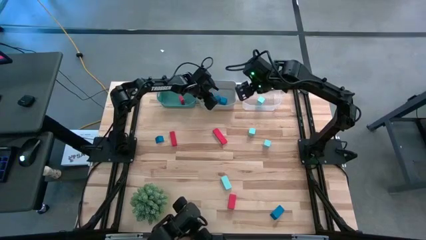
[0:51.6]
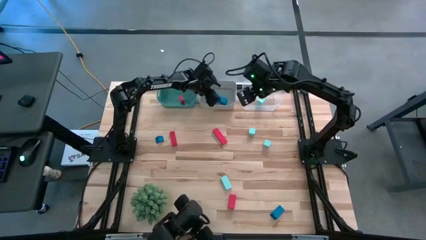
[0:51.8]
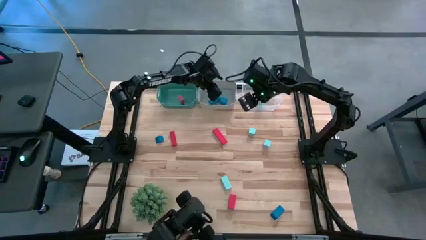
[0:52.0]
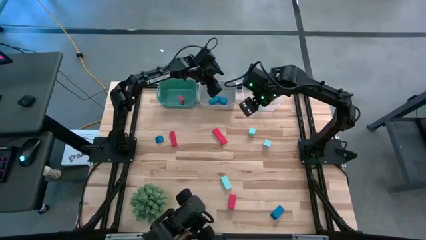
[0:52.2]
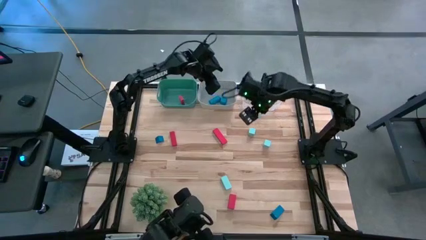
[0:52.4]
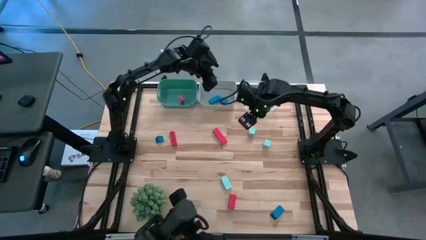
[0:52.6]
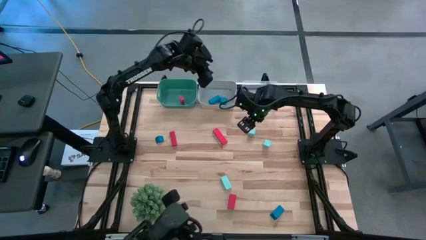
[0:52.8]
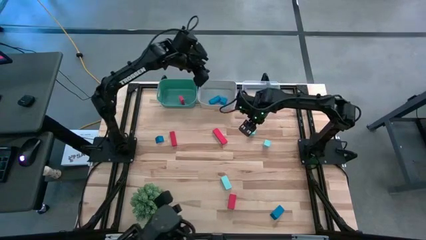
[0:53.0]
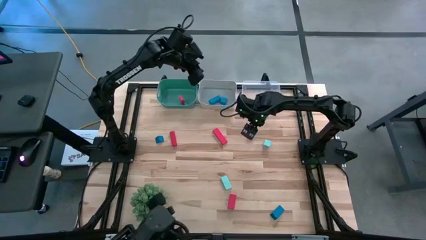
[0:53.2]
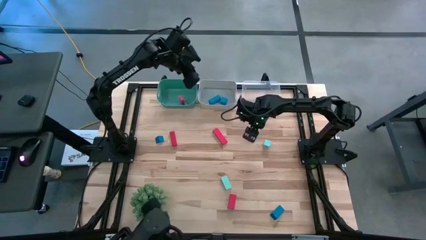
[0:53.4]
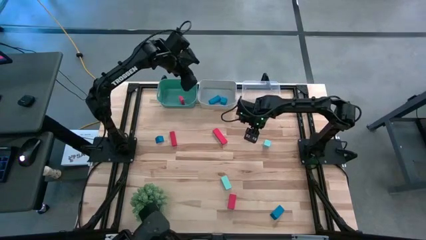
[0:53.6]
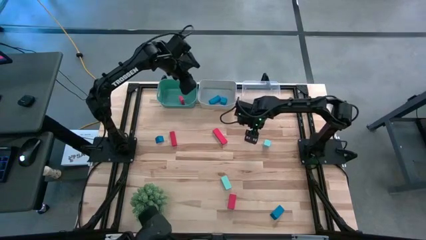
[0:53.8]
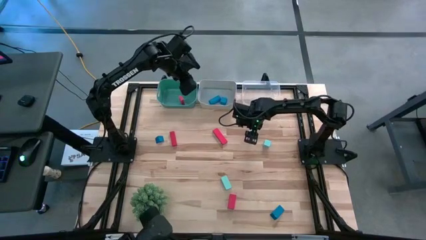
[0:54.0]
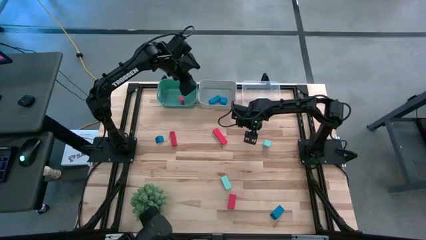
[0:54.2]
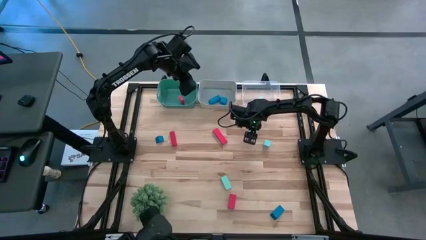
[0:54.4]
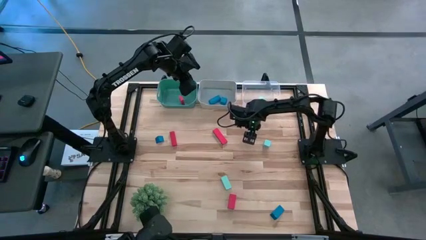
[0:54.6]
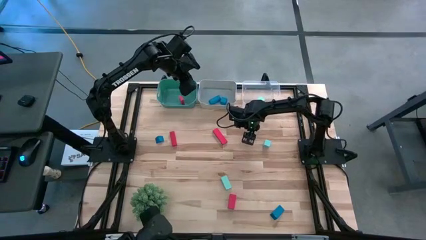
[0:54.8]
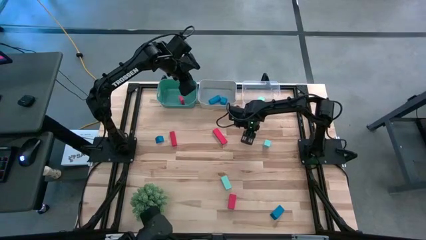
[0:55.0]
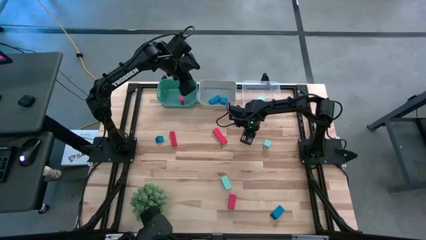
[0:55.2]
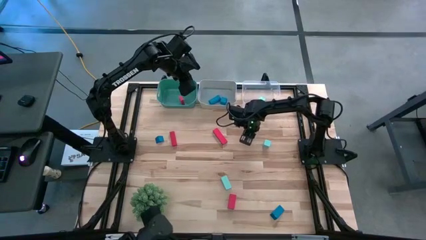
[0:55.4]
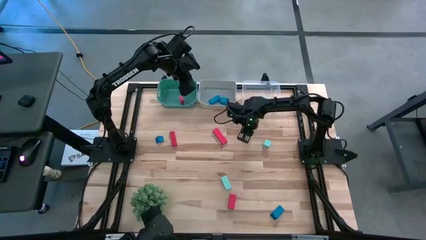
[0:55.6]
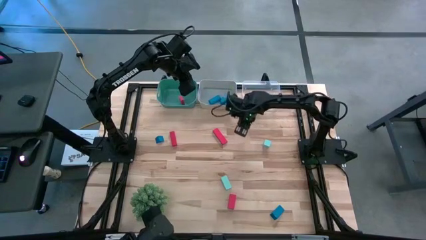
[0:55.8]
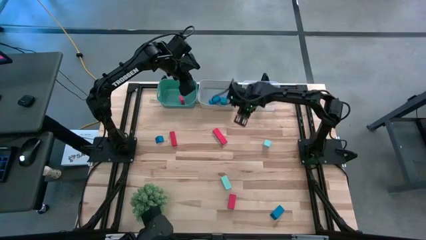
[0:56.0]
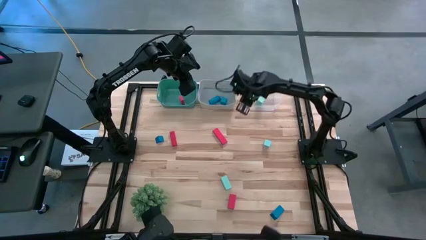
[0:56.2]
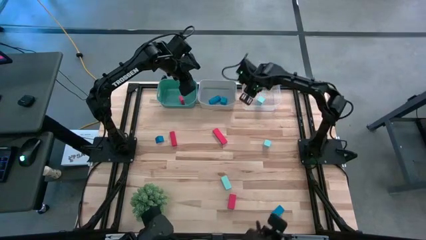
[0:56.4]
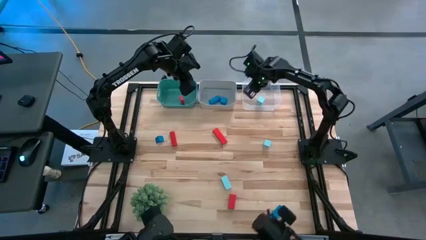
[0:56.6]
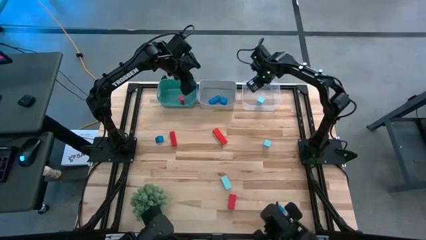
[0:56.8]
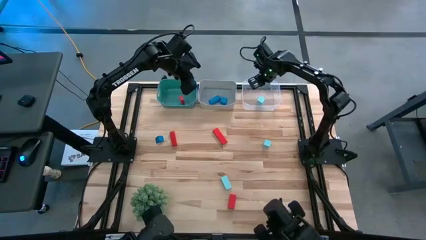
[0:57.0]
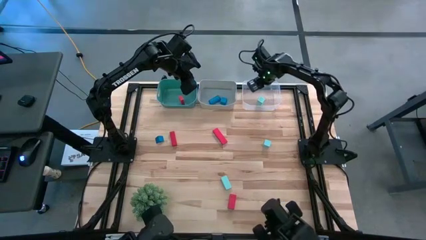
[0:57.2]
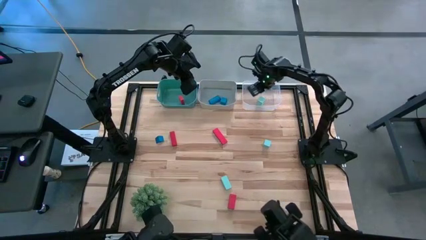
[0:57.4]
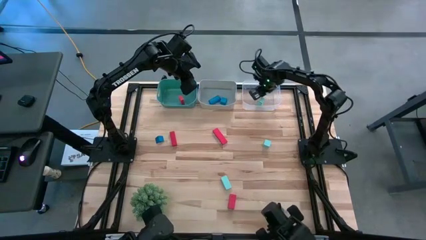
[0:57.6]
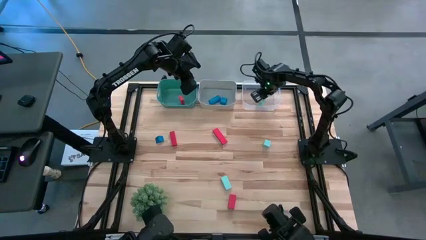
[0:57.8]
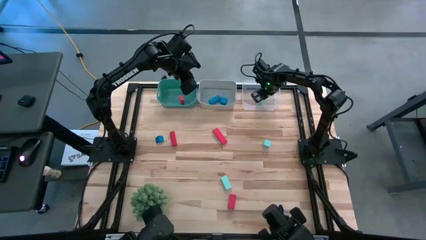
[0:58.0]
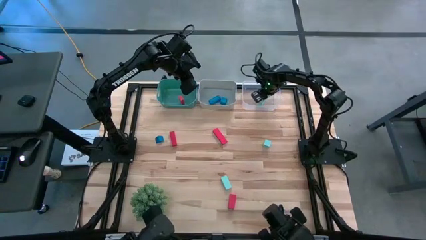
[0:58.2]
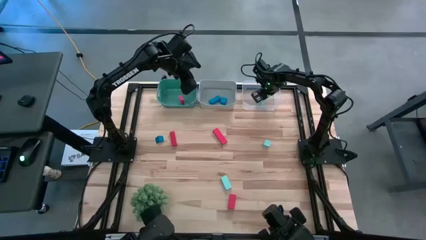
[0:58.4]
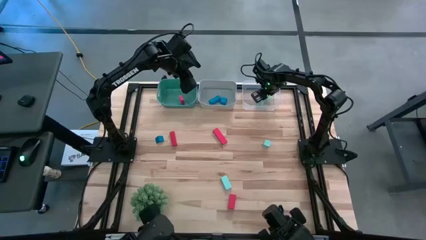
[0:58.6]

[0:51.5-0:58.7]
Task: Sort & place blocks by color
Put the light blue block into the transparent bin

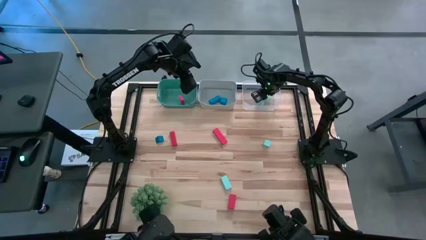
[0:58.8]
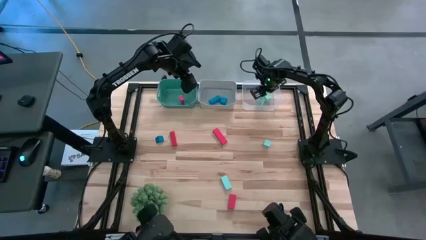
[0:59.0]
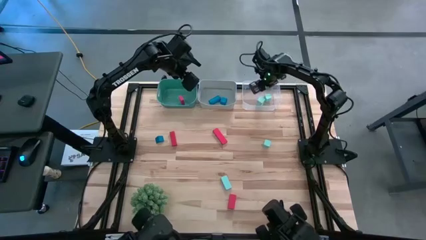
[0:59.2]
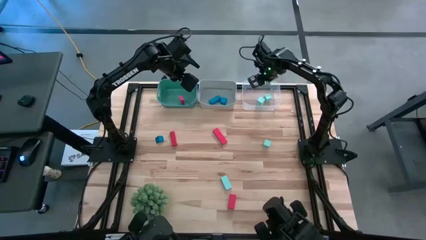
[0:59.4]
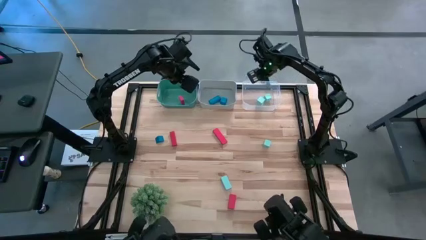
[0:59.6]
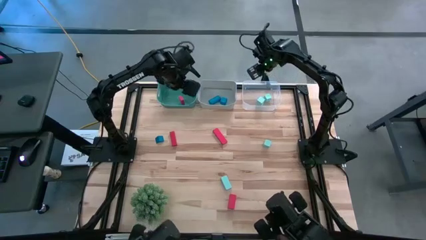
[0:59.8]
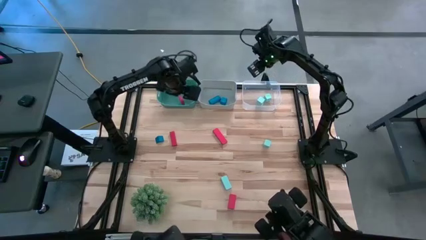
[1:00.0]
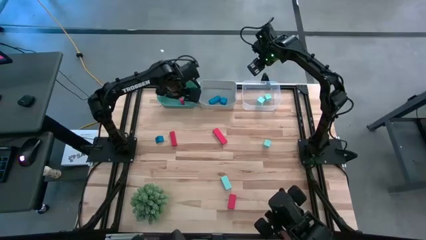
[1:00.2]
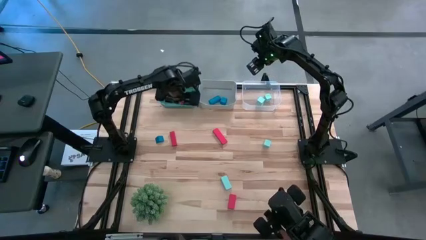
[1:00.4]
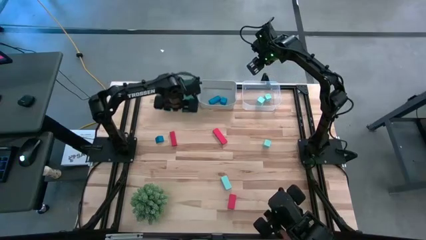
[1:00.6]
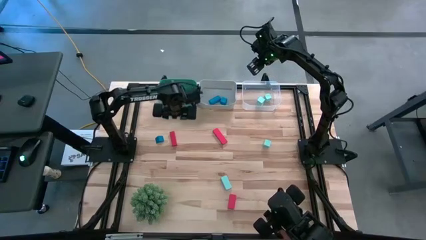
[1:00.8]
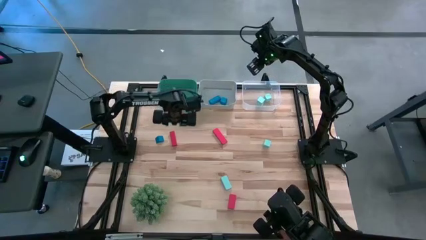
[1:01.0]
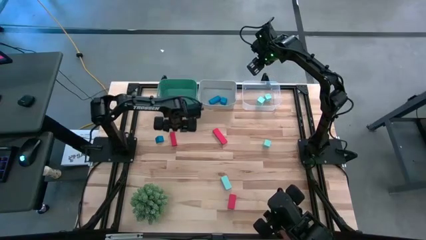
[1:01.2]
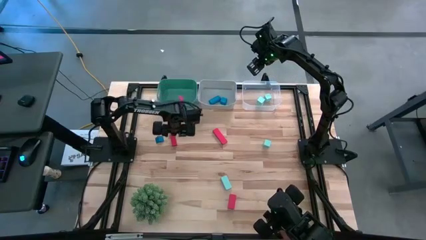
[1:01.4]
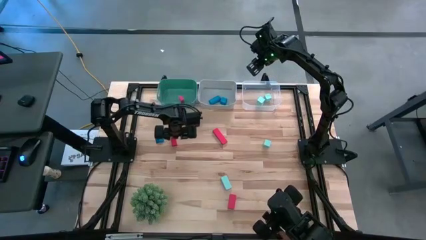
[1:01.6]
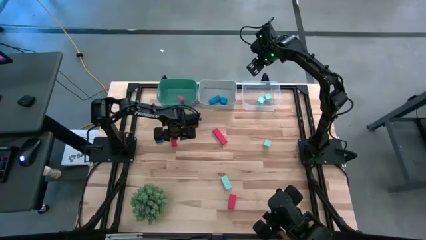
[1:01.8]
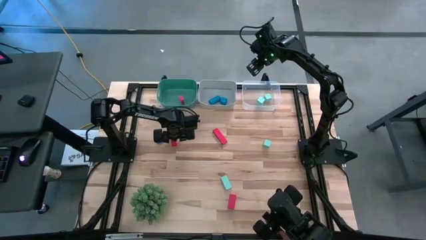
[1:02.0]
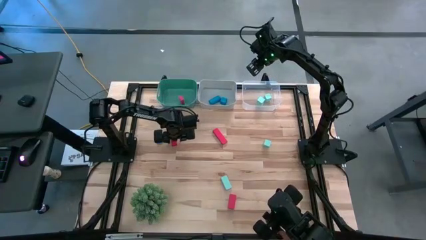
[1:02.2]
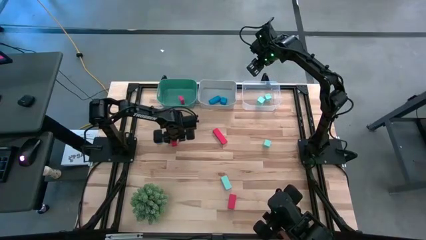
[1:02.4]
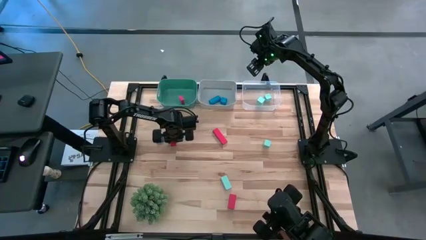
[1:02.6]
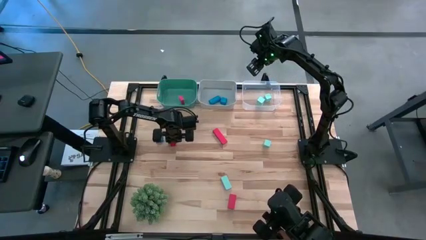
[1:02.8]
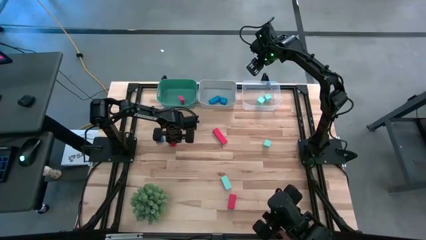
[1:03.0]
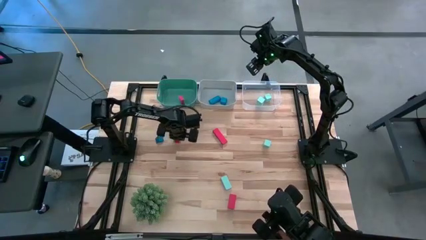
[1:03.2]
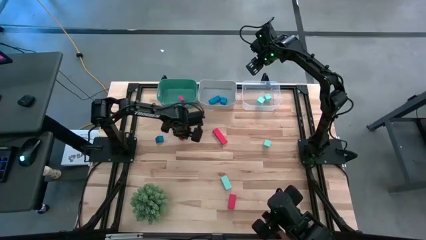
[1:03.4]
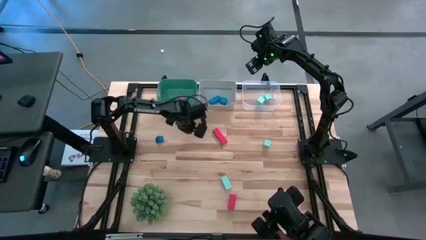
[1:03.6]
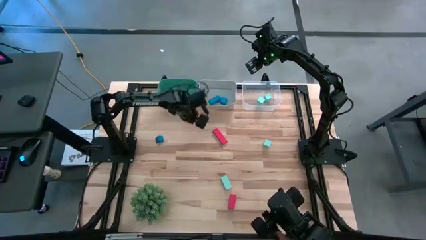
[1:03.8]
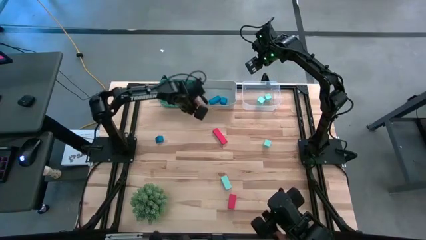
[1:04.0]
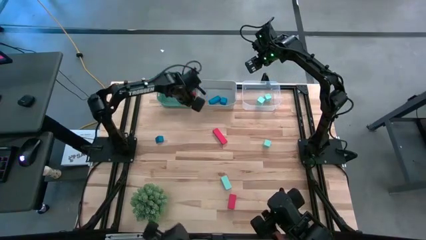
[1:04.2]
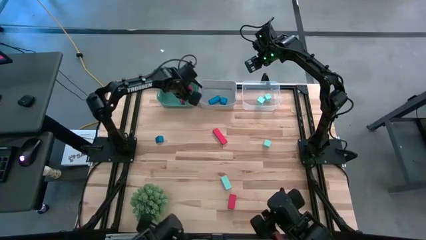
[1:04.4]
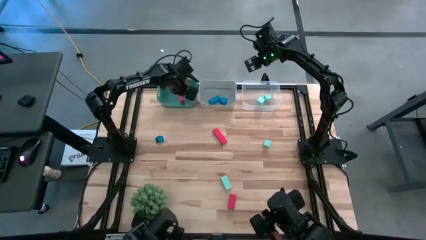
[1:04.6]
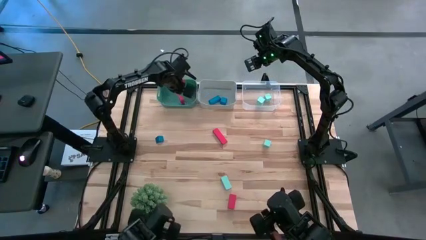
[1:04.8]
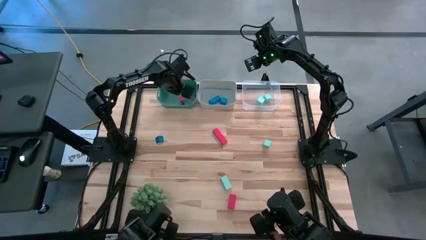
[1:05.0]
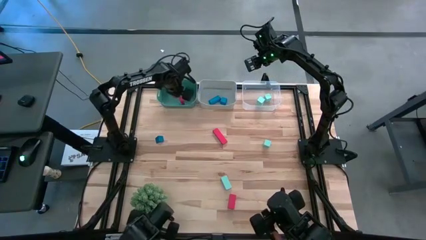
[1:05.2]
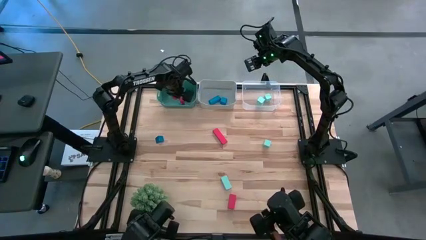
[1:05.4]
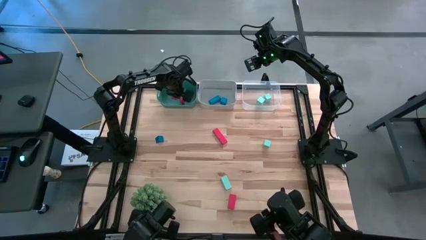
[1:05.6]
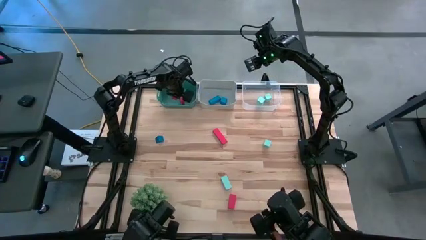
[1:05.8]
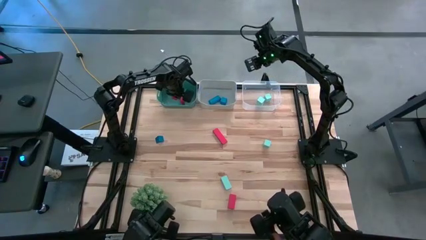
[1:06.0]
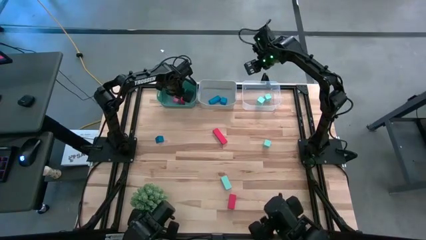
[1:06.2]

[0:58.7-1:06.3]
Put the red block into the green bin

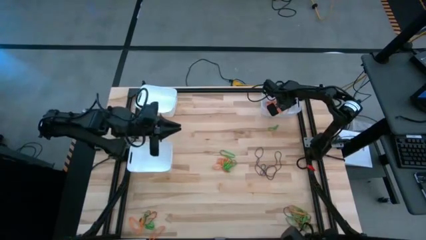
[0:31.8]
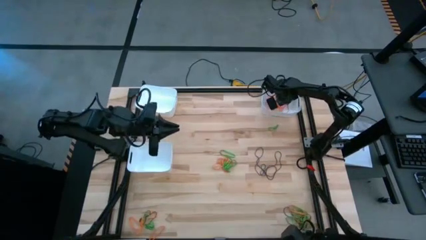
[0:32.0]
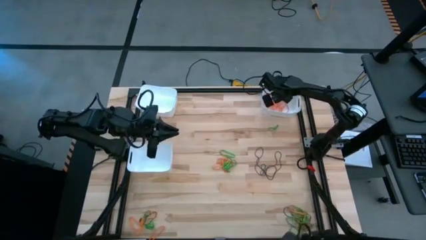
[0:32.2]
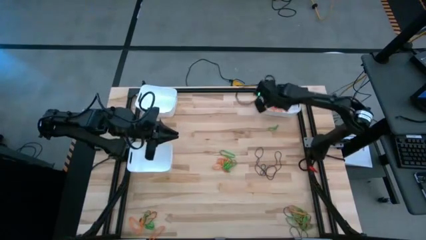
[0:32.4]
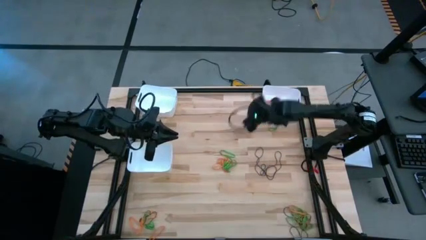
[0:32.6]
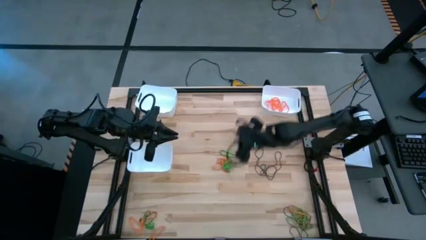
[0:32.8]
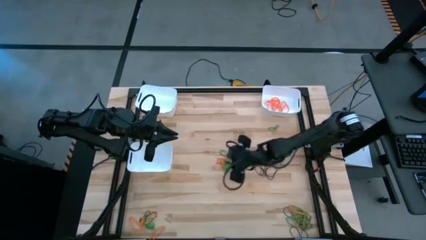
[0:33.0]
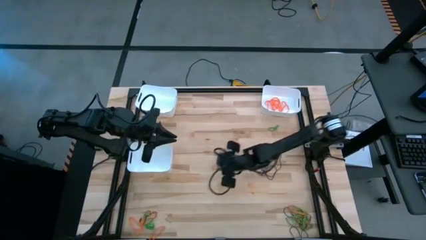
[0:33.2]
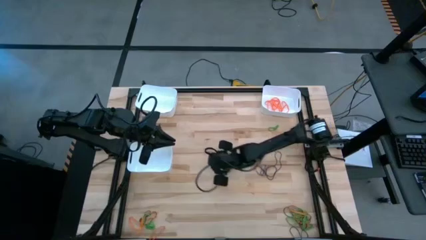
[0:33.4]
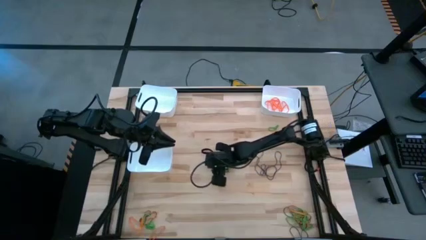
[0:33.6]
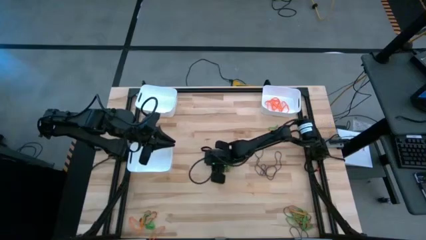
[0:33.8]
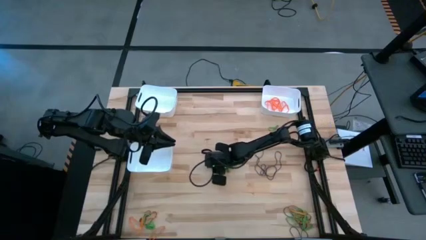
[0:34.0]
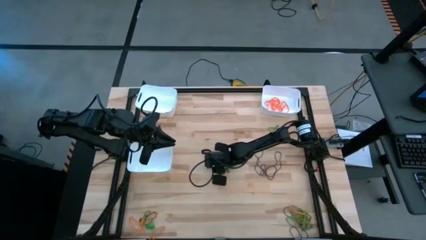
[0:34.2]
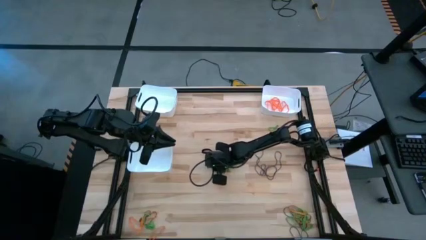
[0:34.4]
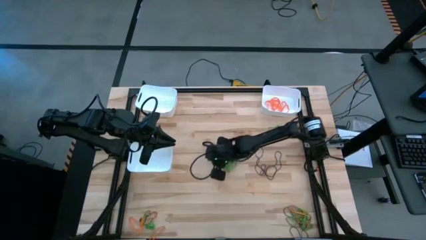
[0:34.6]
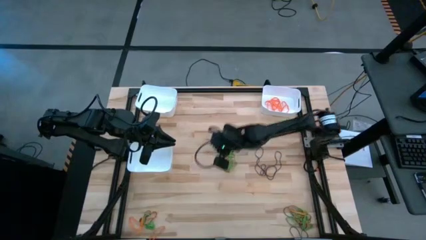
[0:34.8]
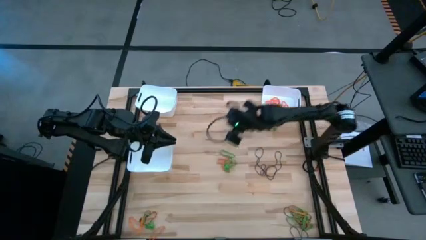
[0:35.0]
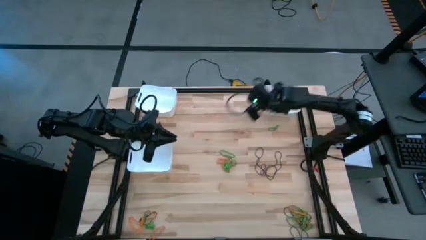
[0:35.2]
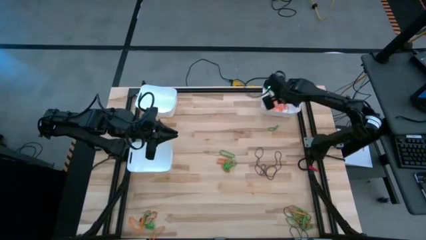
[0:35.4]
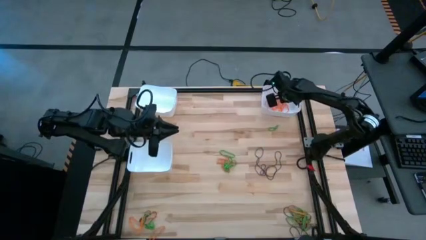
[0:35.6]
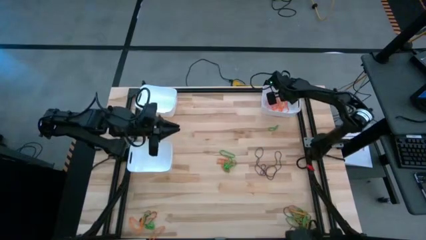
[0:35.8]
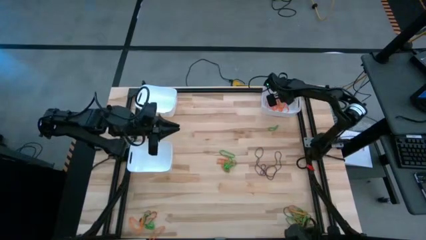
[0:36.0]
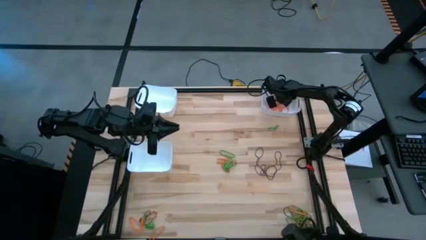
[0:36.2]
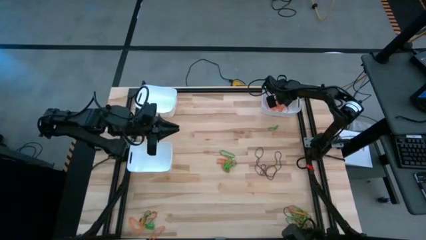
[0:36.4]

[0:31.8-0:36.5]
Task: Sort rubber bands into baskets
Put the orange rubber band into the top right white bin
